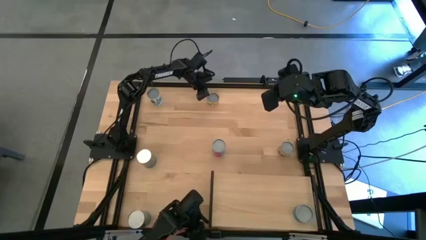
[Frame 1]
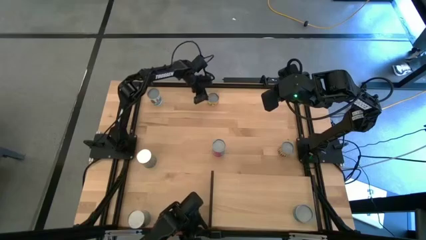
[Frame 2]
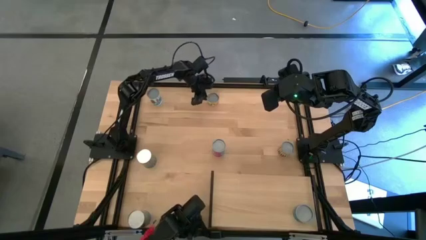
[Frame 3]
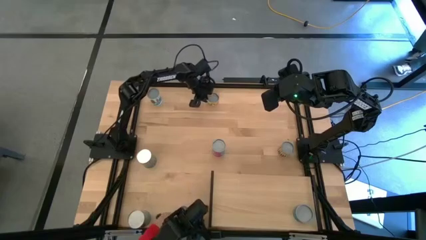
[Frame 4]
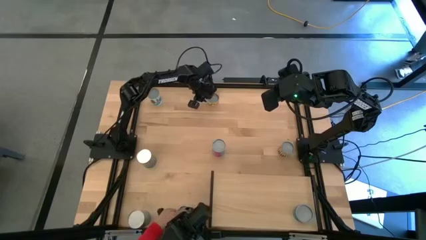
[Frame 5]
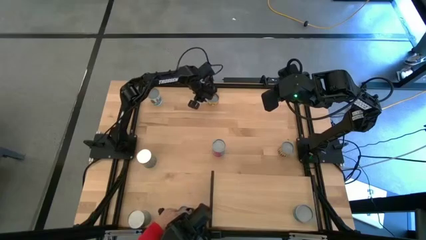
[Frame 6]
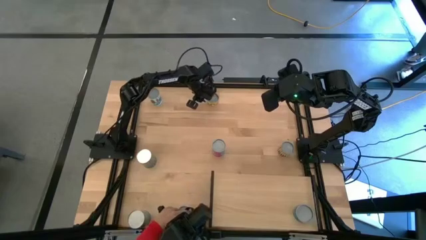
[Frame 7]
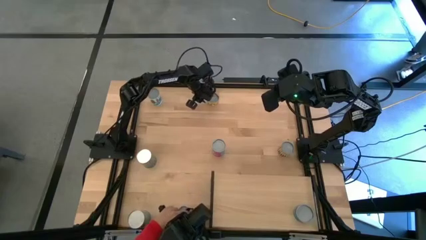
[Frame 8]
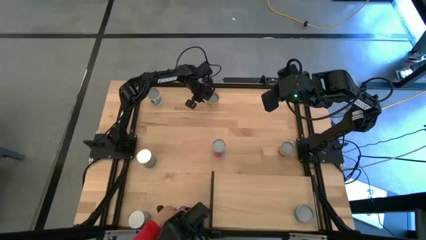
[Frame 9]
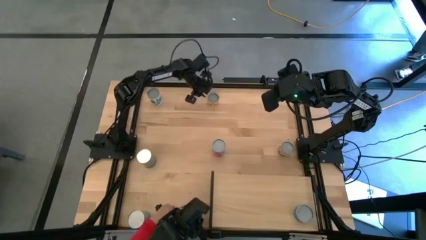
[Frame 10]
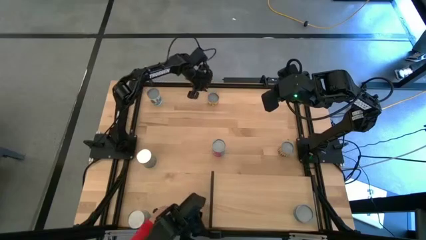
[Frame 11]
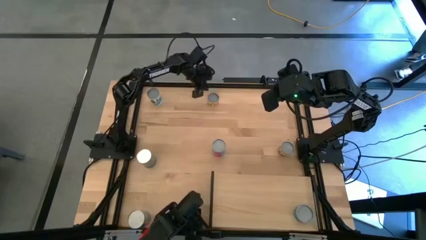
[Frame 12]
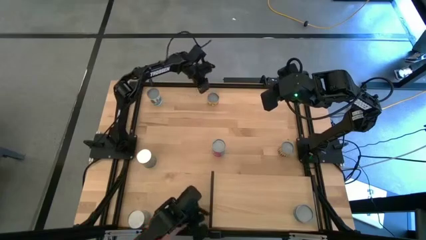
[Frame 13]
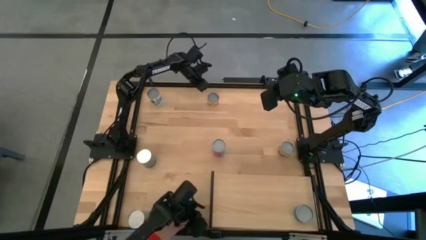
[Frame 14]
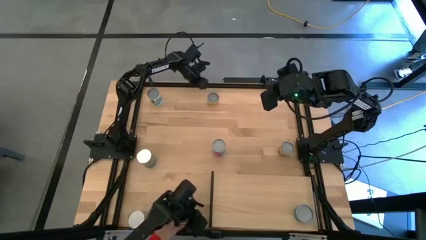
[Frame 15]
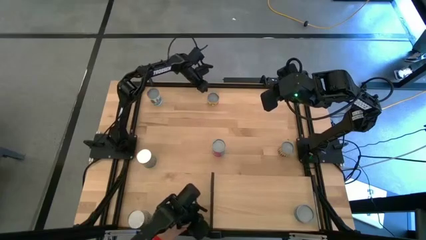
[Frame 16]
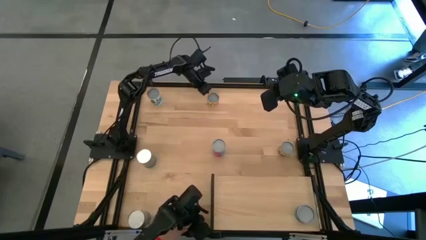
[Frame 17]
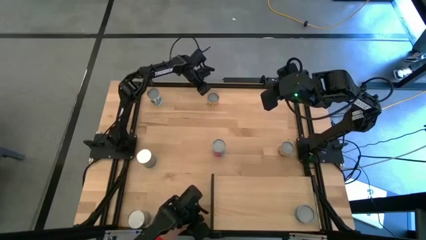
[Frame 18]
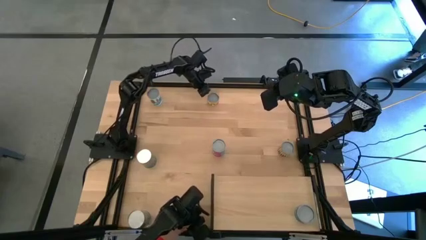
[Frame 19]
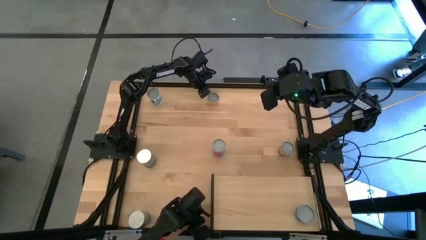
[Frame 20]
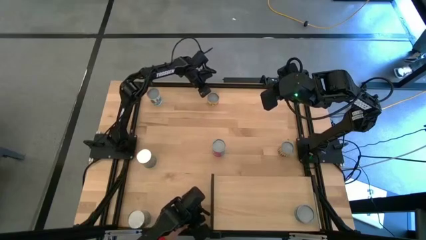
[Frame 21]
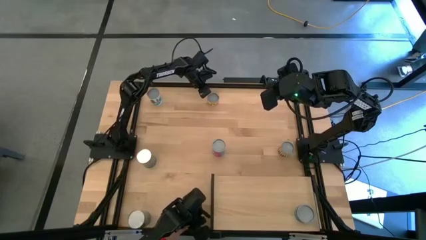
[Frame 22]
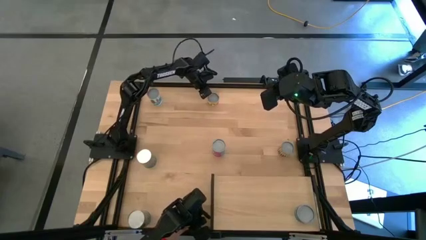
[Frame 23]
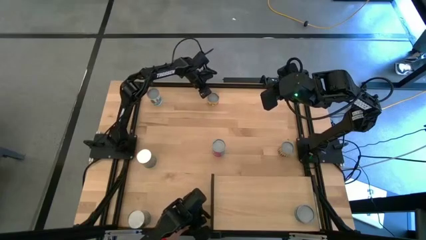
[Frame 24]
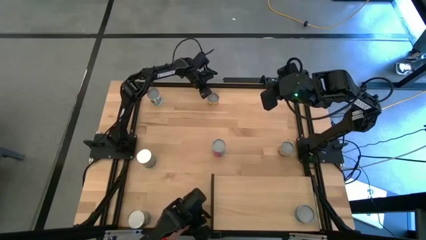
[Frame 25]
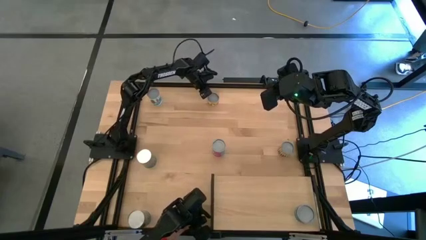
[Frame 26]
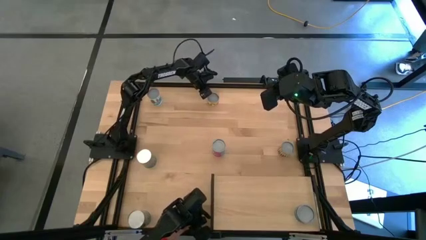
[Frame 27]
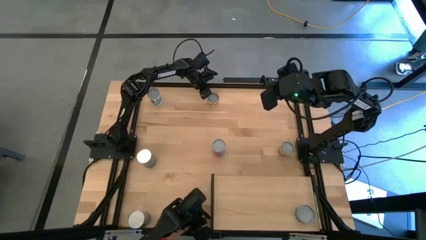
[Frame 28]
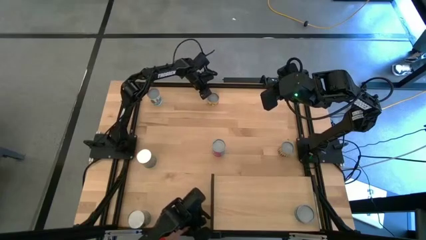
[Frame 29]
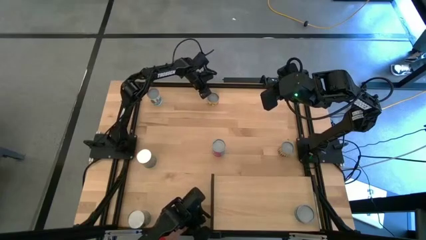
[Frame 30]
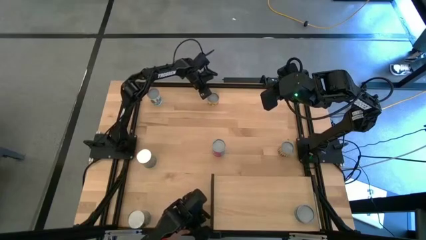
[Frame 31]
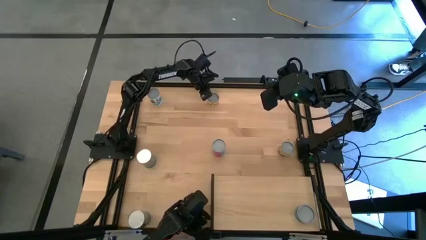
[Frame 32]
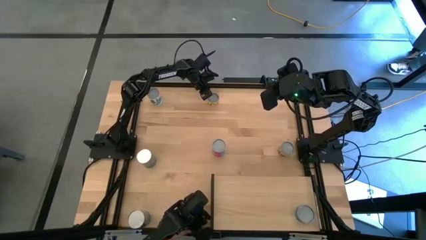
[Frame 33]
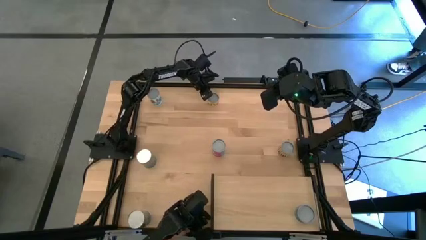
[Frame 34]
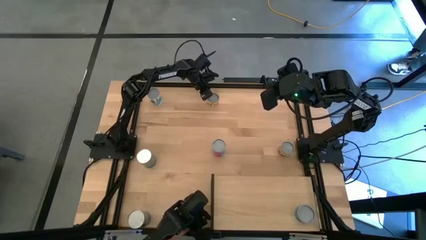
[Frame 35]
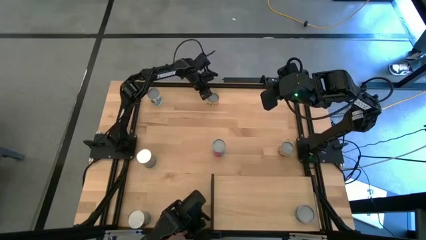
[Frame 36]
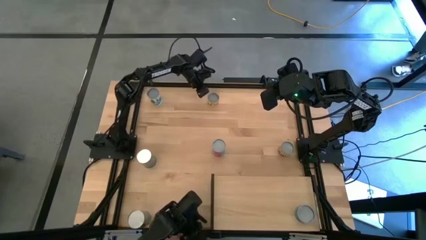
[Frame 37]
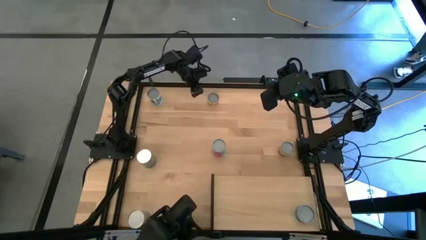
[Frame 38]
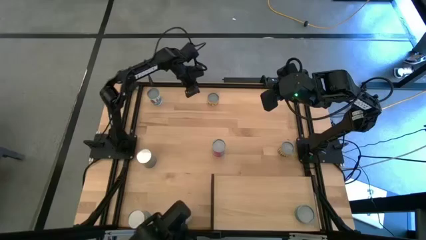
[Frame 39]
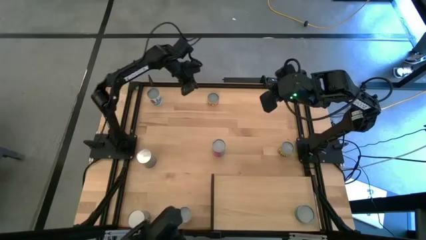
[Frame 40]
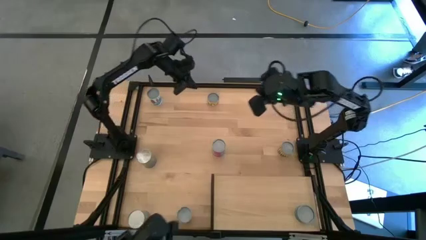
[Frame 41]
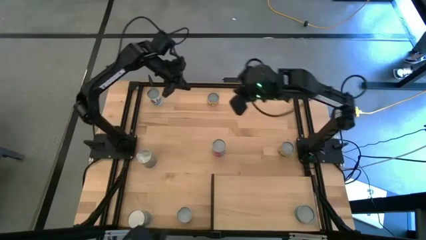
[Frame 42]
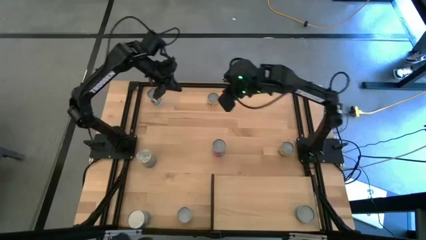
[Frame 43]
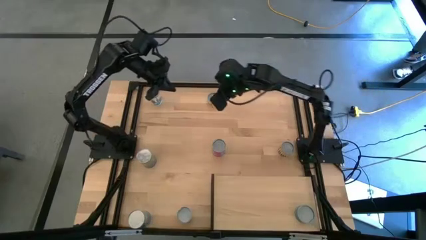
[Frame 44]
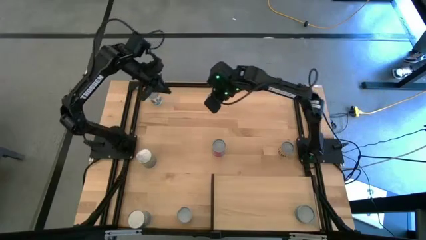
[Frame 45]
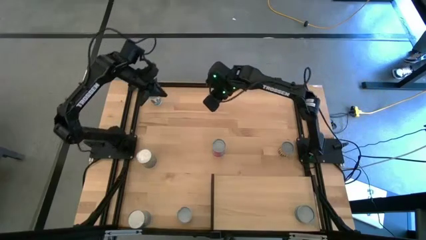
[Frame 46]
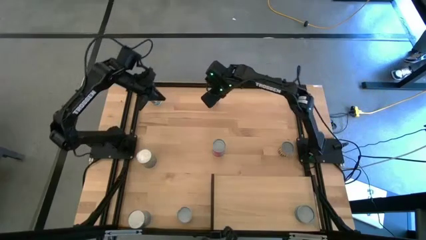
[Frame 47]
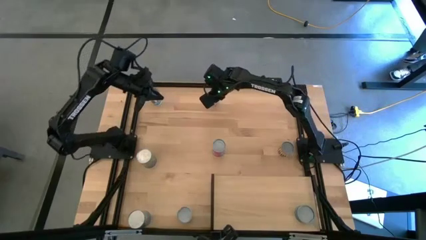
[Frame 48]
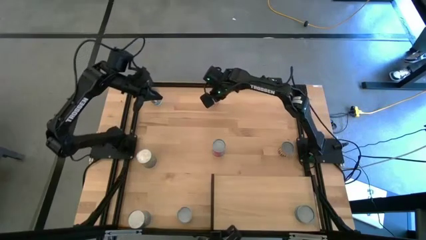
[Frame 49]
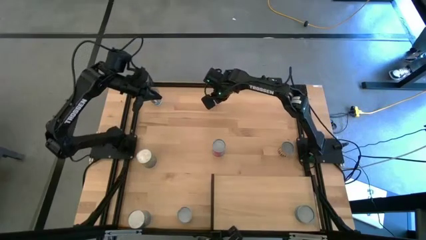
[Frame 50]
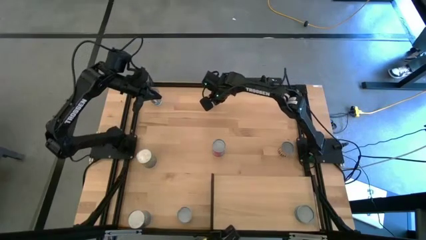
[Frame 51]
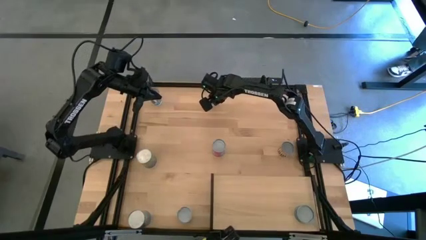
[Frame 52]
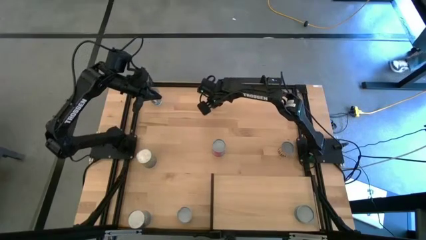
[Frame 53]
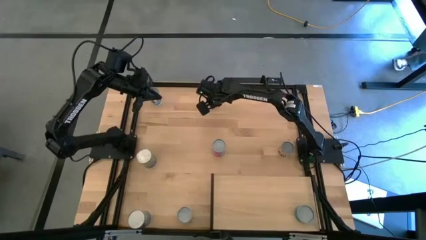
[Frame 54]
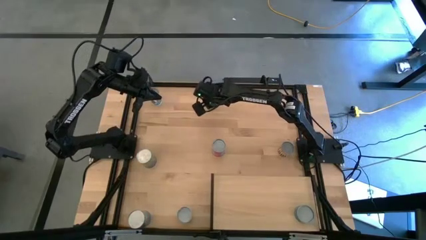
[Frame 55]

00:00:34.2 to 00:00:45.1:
Task: Pick and place cans onto a shelf
Put the canned mushroom on the shelf
